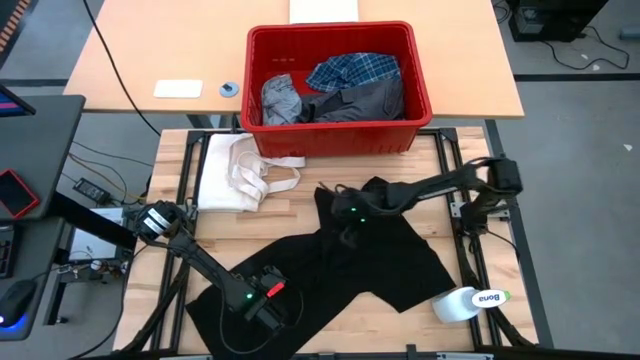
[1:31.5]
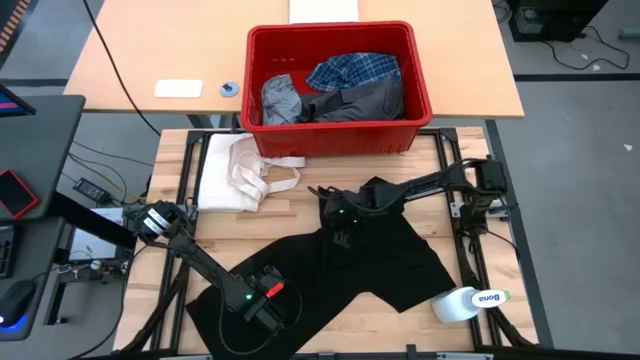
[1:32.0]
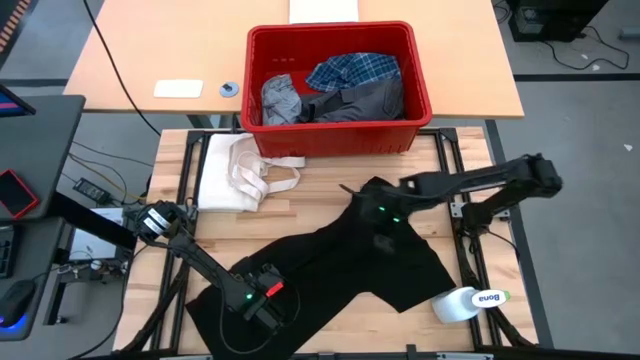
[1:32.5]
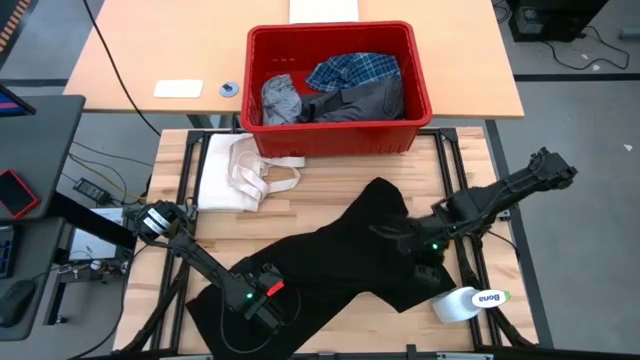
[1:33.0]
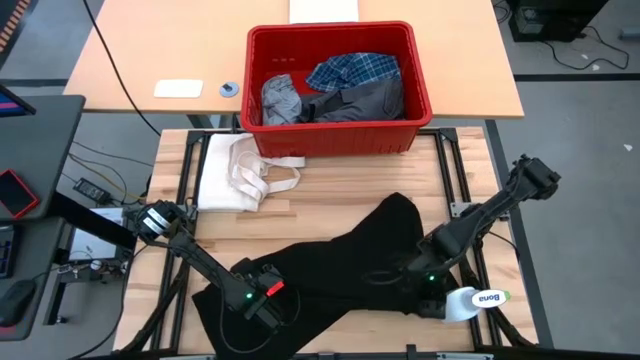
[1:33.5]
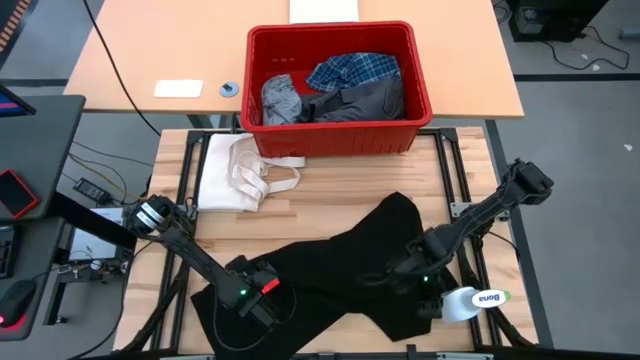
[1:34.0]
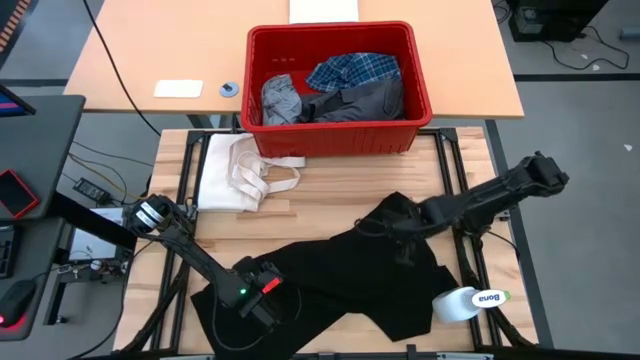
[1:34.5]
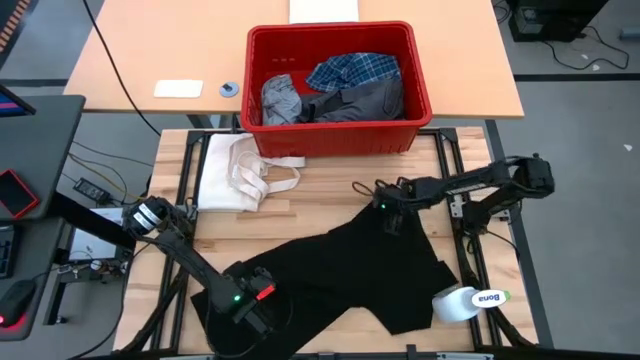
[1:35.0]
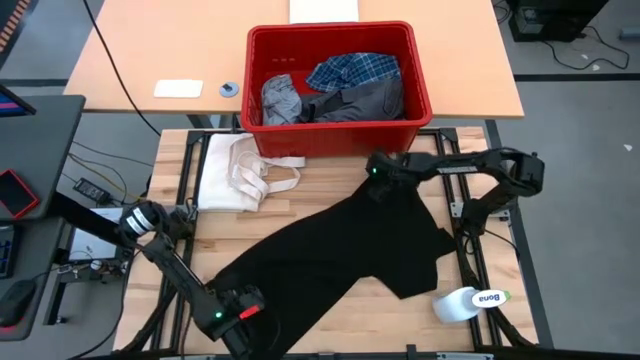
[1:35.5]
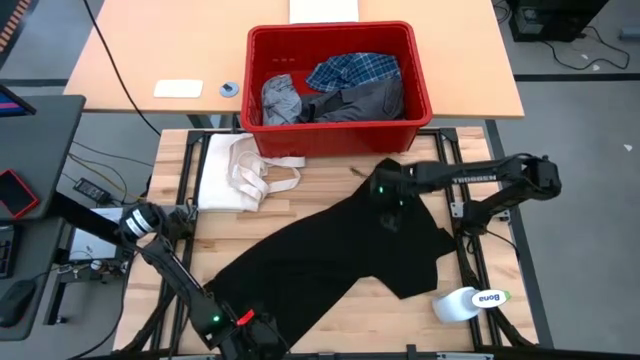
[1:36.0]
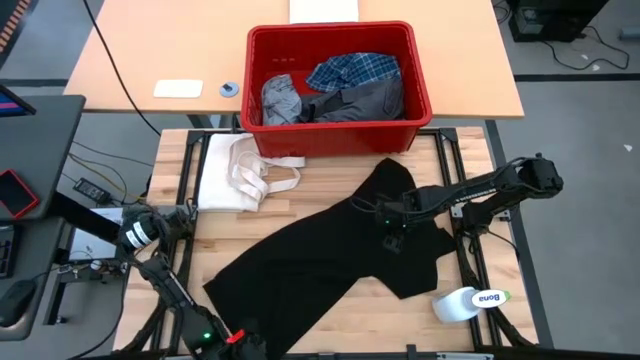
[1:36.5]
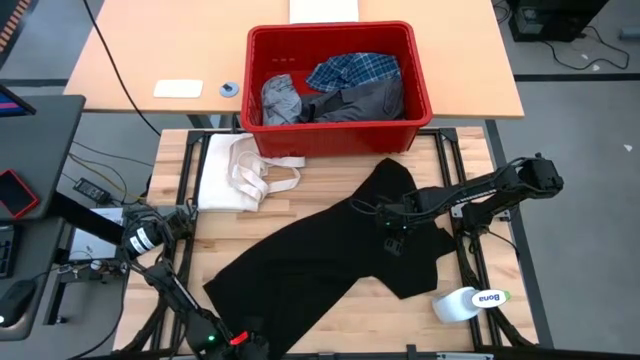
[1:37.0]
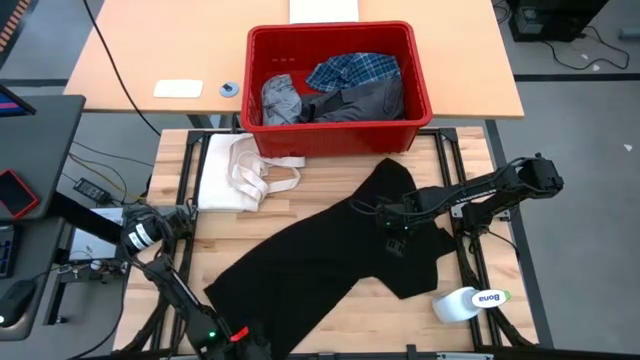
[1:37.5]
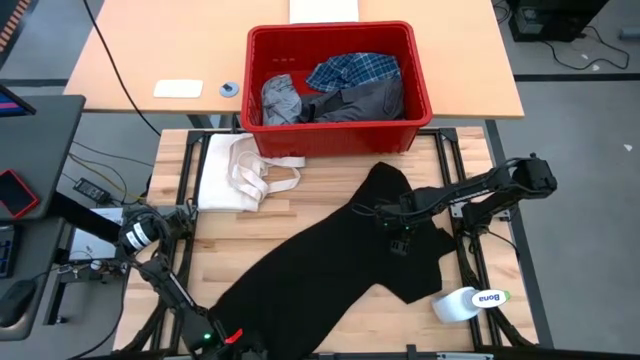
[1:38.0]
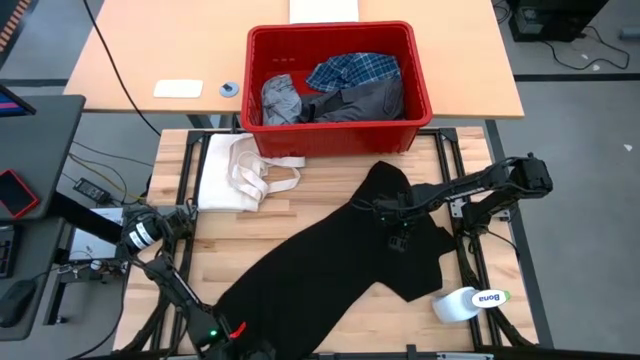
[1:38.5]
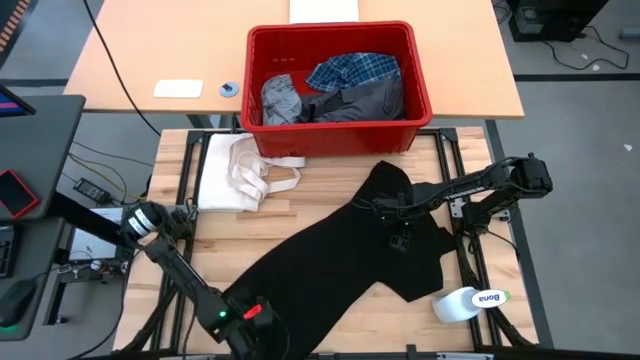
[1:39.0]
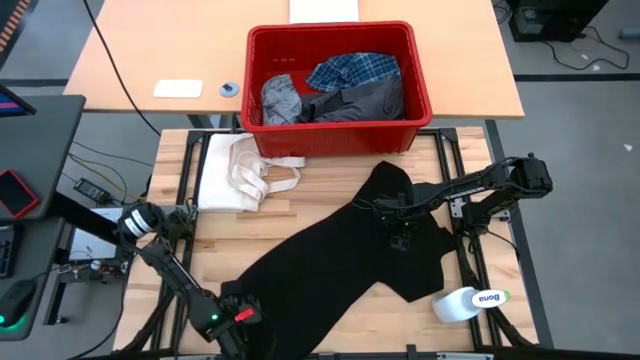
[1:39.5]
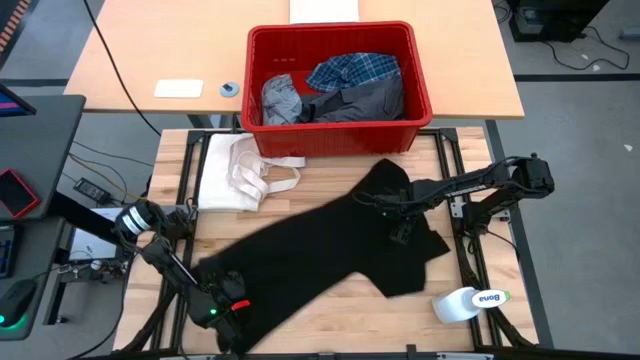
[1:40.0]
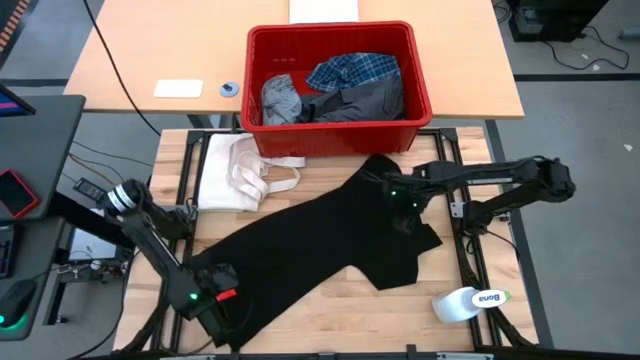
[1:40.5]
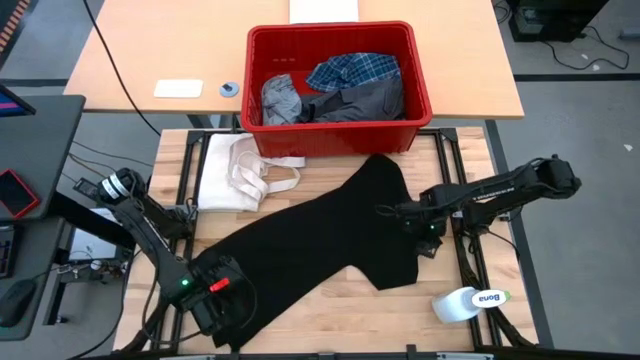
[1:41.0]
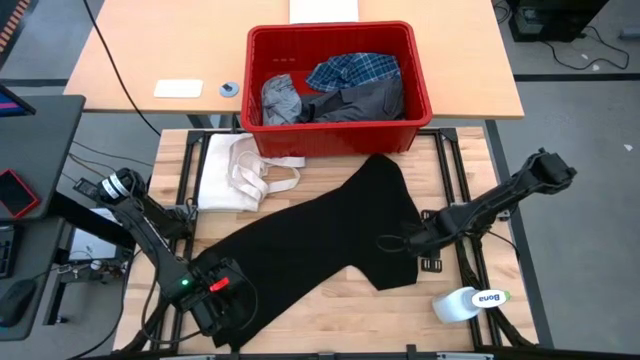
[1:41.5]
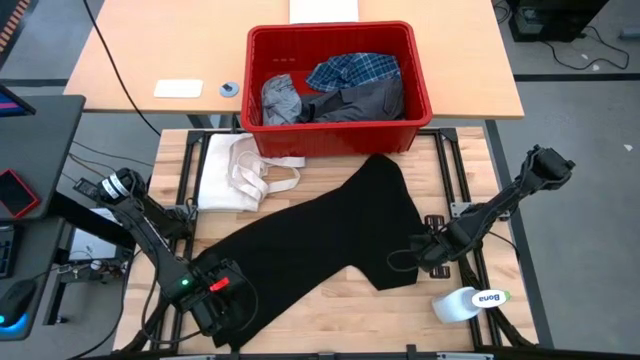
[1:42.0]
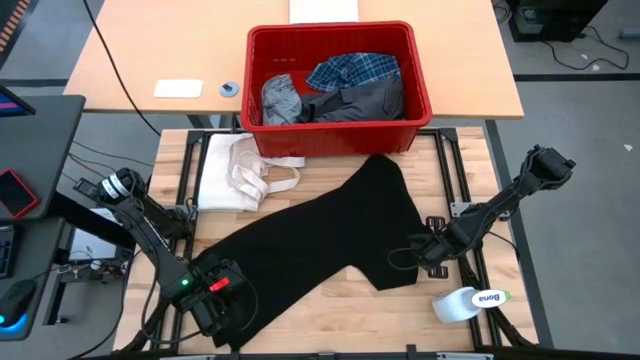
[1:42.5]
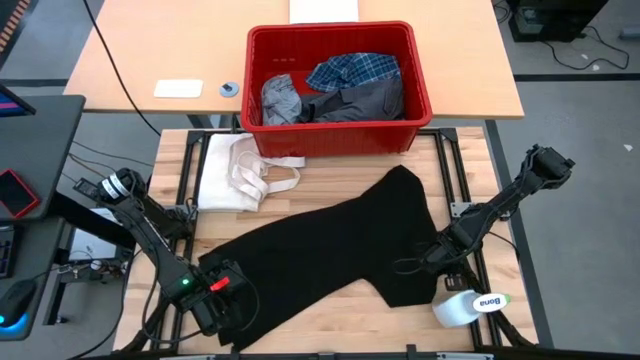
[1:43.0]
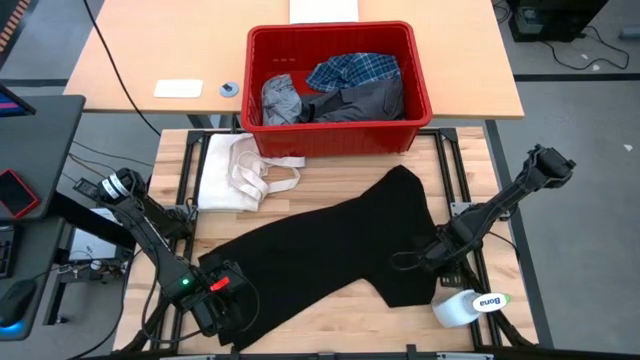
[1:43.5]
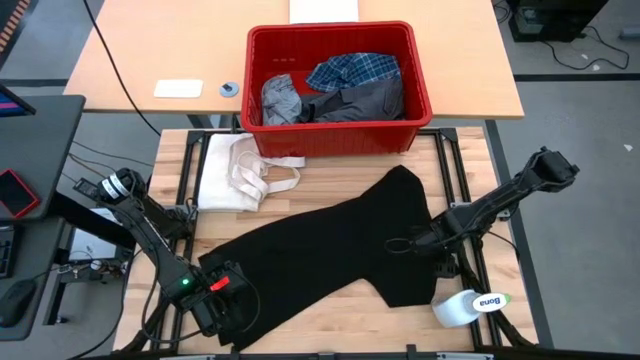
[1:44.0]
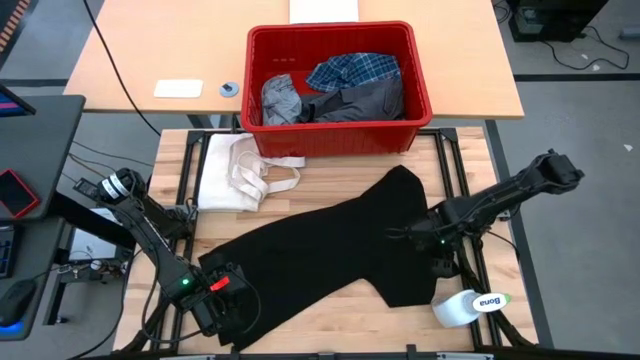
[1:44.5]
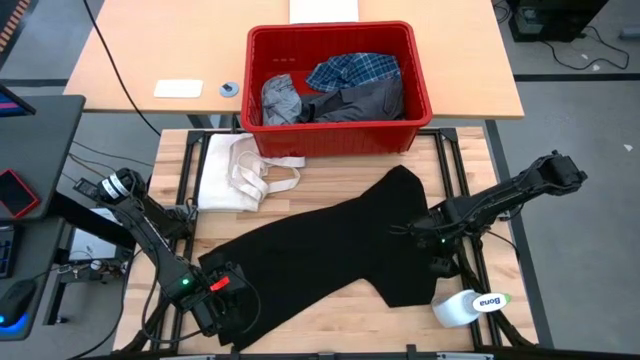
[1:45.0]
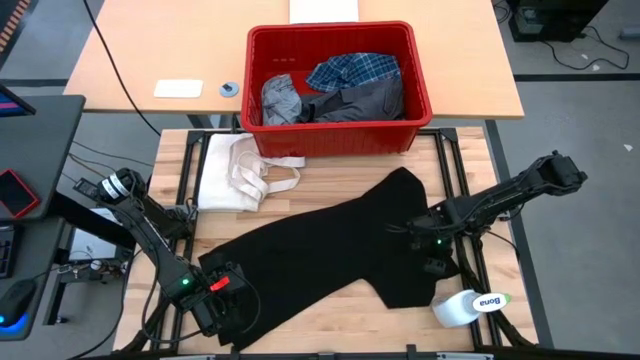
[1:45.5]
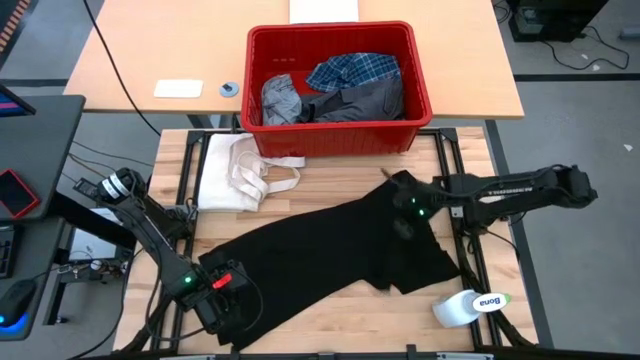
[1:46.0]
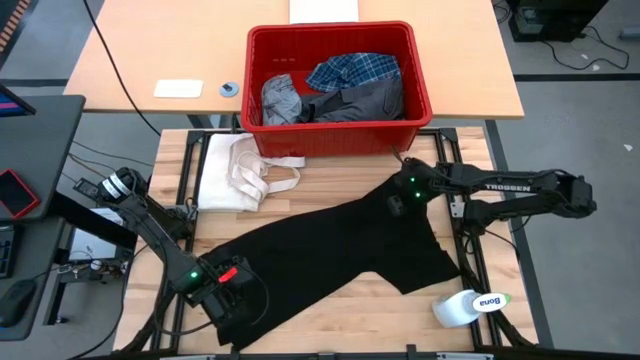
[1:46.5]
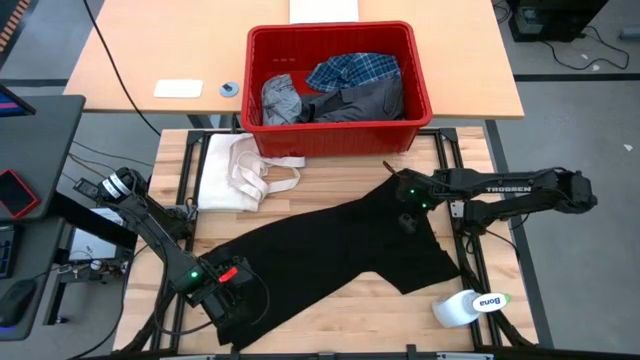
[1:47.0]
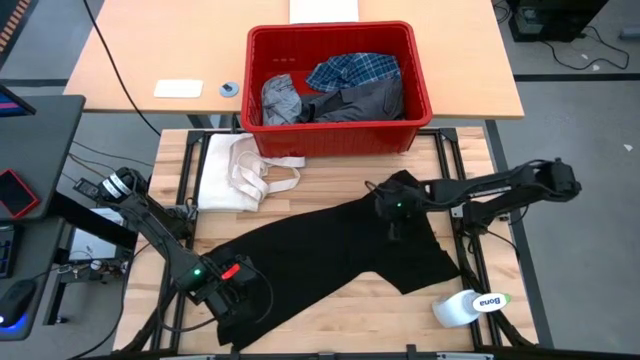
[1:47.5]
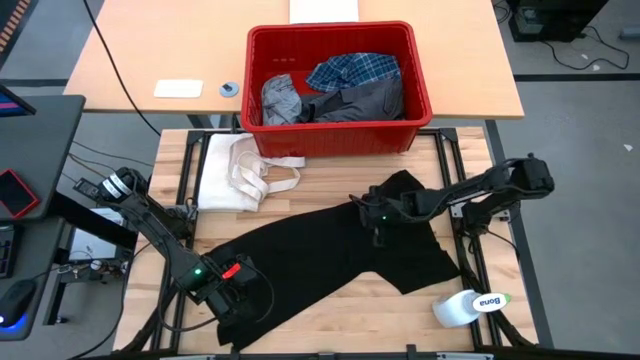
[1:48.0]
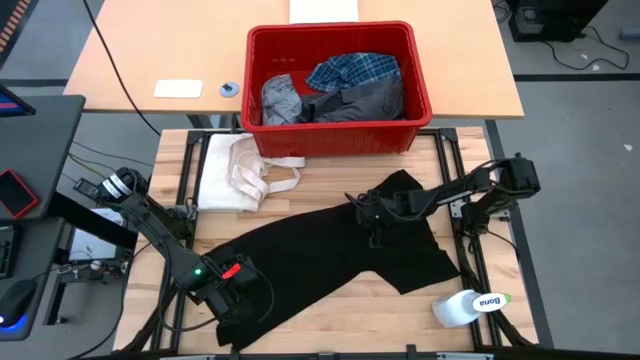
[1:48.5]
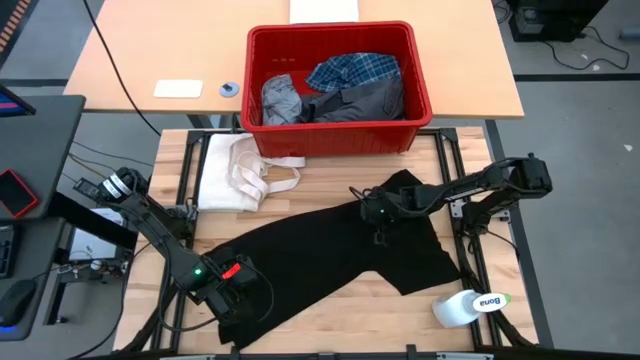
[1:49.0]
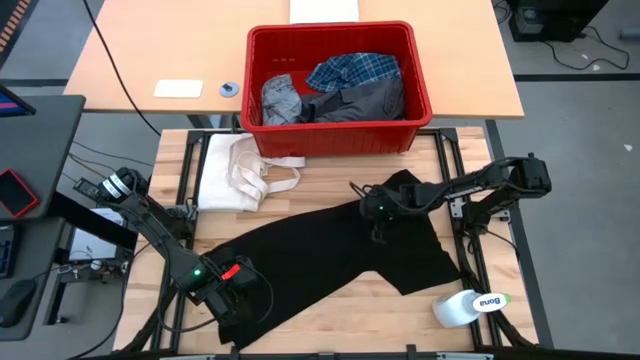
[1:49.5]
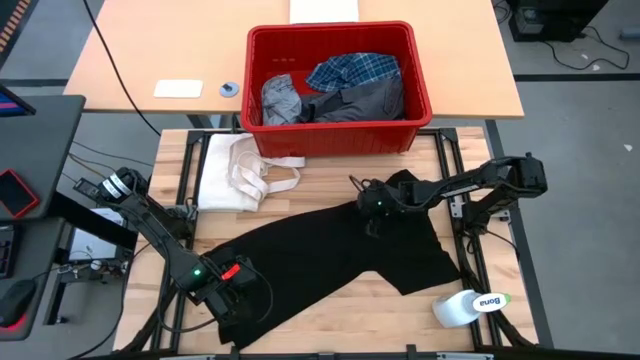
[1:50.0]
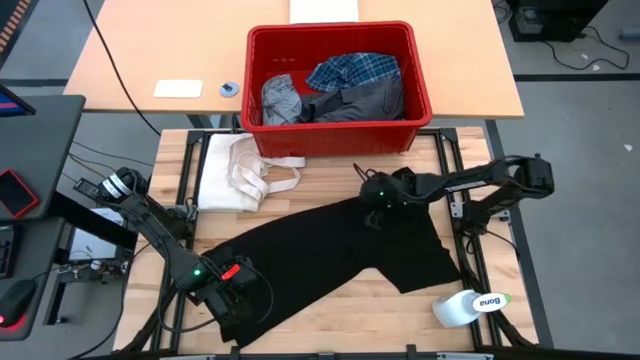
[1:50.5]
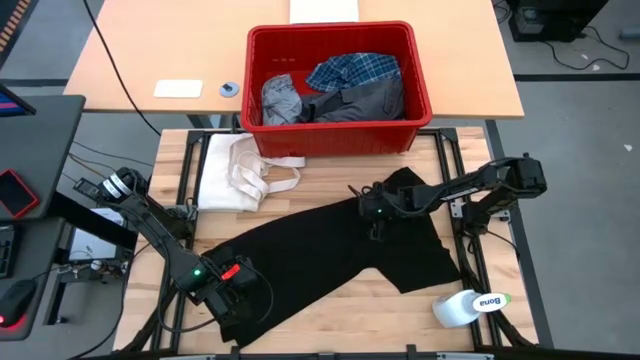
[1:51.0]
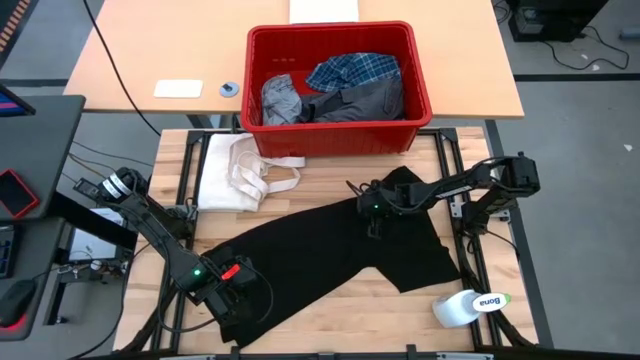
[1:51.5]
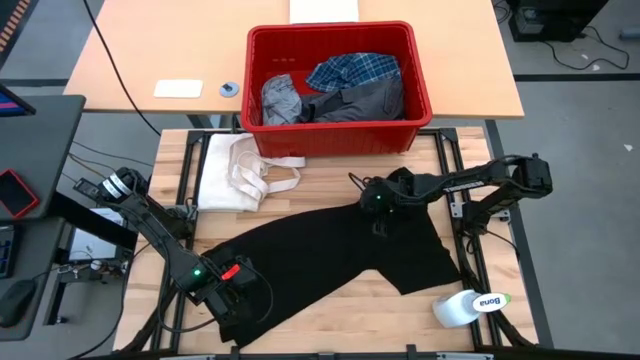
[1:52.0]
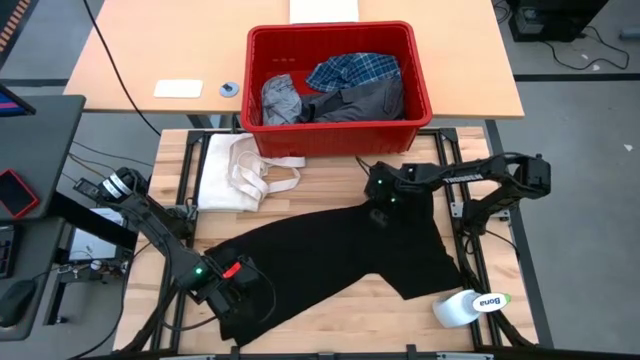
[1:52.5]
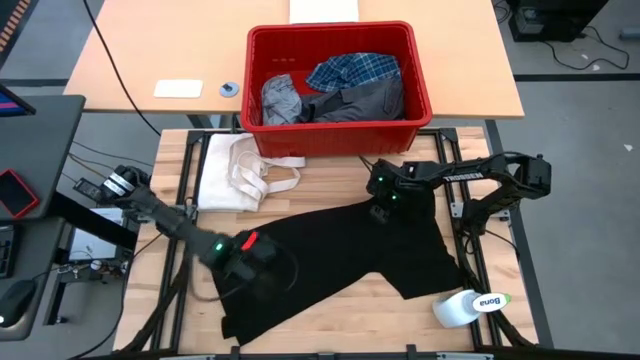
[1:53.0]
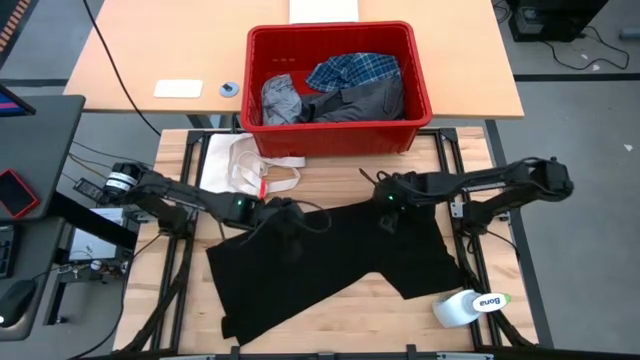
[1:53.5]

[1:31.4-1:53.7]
Task: Fold Laundry from Bin
Fold the black shirt
